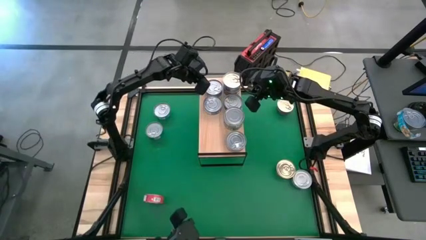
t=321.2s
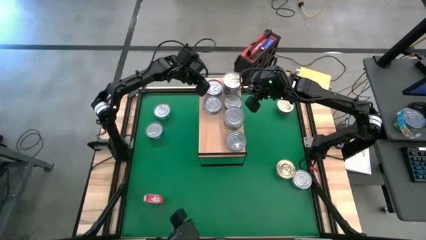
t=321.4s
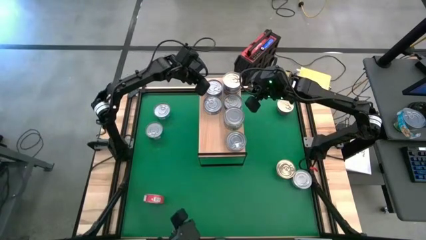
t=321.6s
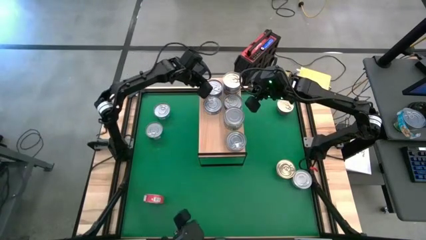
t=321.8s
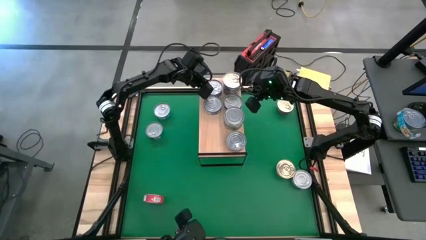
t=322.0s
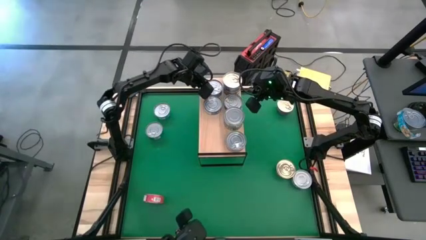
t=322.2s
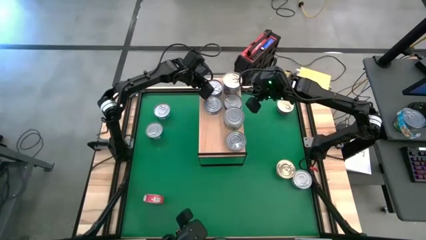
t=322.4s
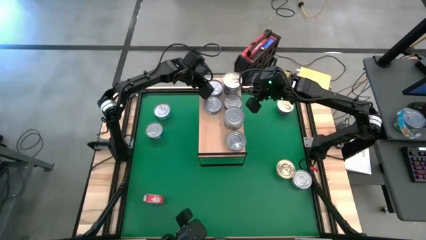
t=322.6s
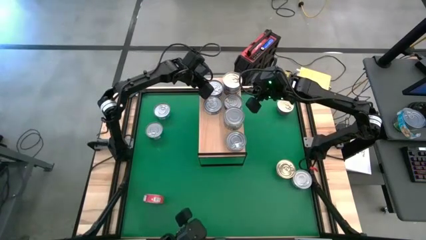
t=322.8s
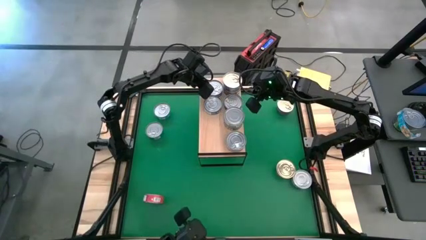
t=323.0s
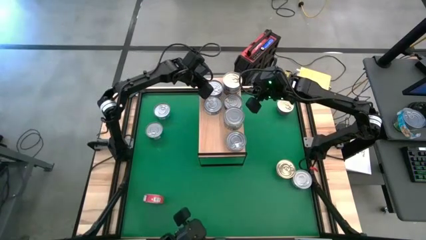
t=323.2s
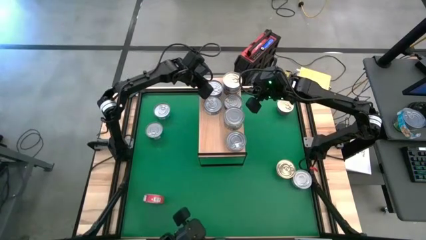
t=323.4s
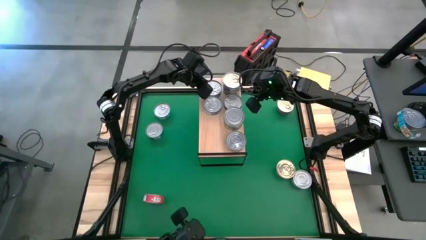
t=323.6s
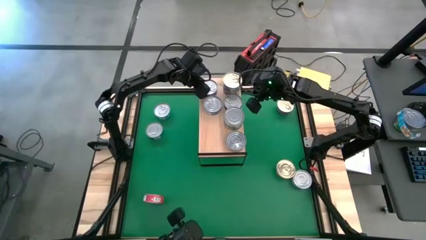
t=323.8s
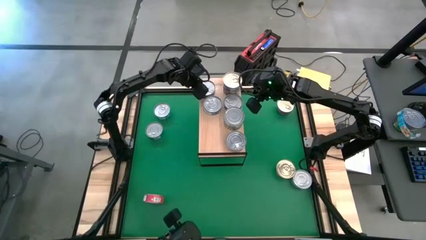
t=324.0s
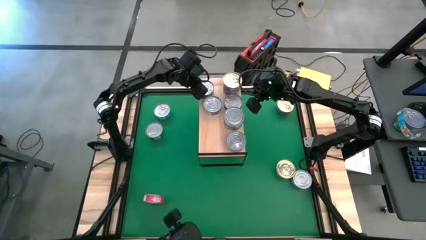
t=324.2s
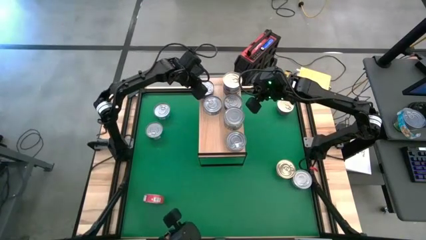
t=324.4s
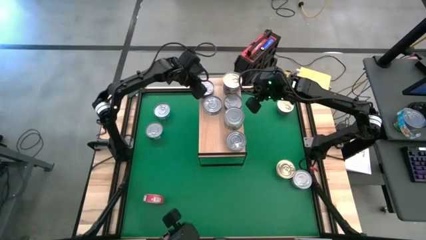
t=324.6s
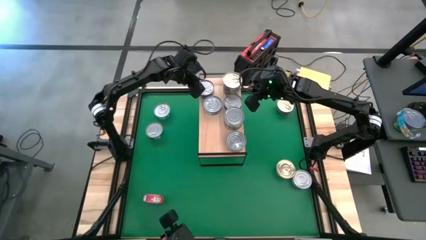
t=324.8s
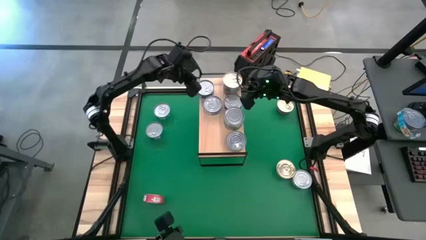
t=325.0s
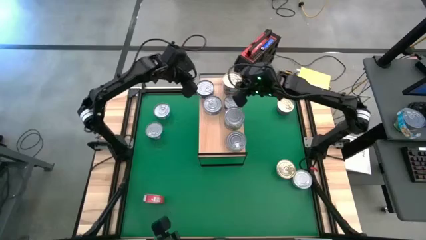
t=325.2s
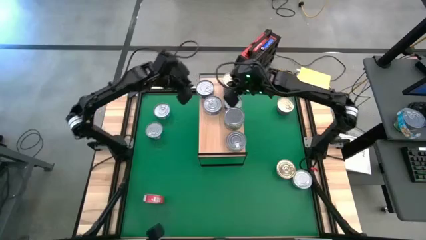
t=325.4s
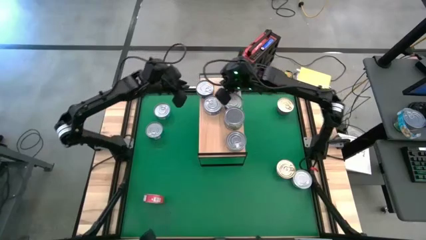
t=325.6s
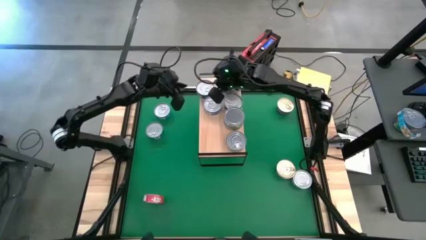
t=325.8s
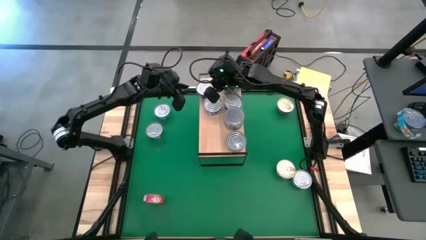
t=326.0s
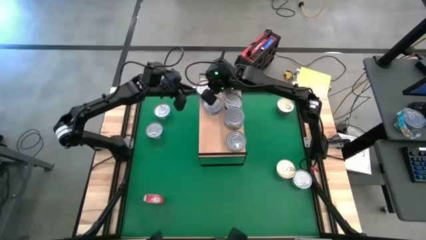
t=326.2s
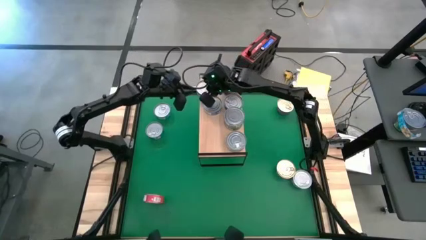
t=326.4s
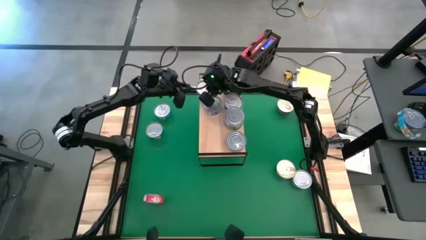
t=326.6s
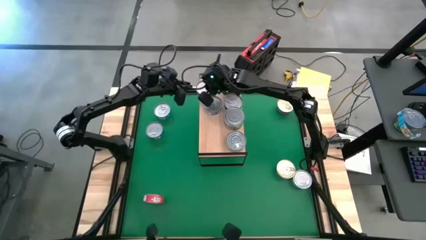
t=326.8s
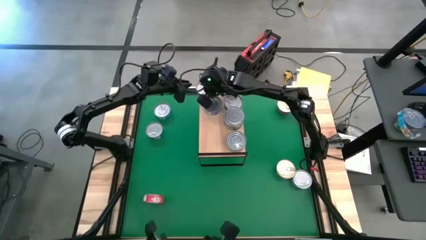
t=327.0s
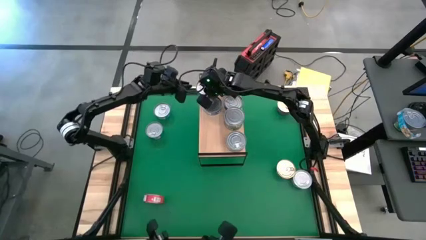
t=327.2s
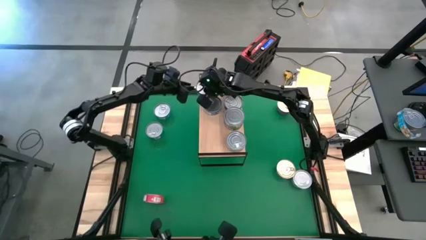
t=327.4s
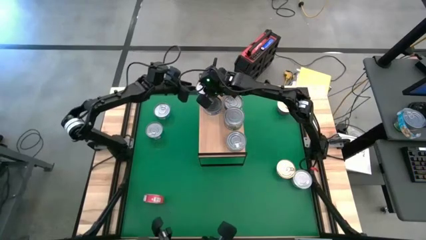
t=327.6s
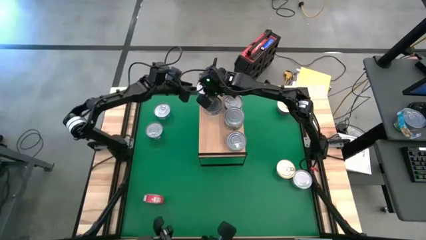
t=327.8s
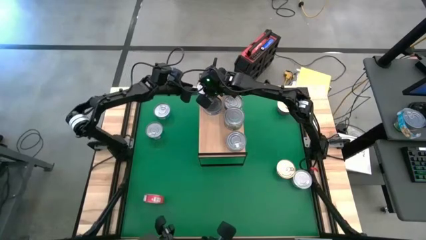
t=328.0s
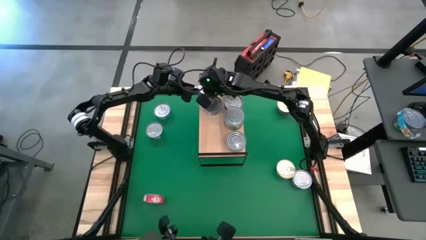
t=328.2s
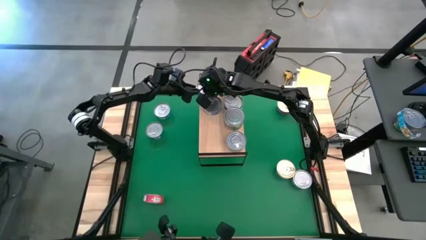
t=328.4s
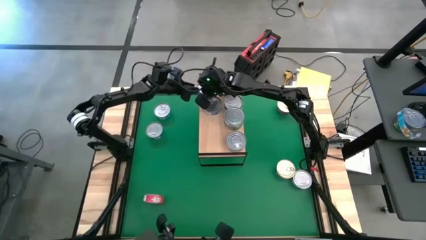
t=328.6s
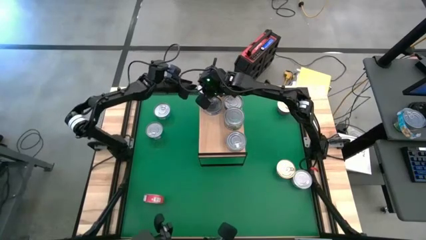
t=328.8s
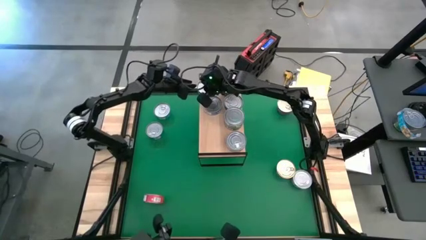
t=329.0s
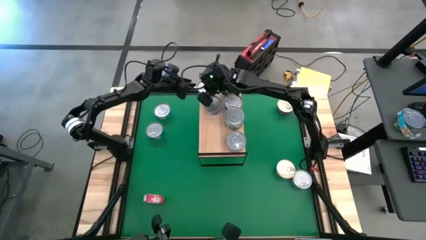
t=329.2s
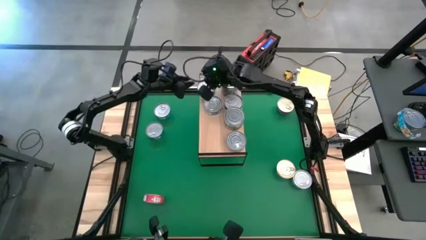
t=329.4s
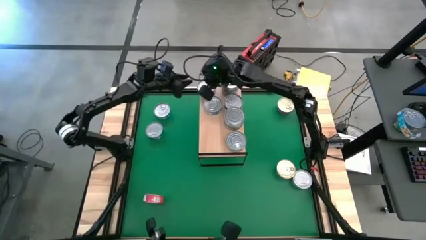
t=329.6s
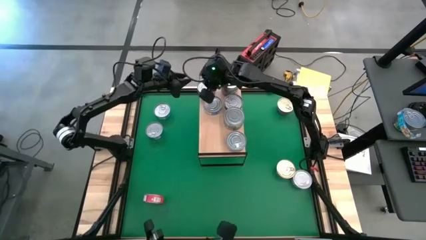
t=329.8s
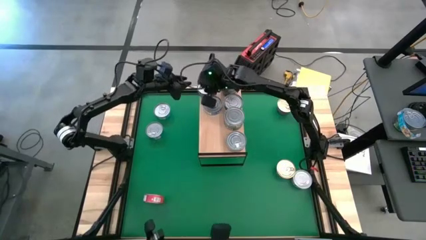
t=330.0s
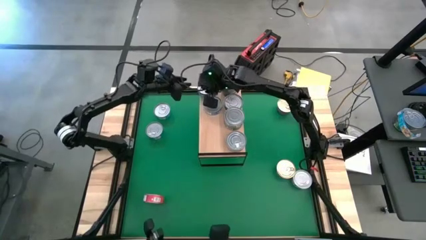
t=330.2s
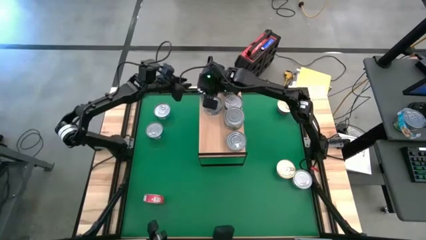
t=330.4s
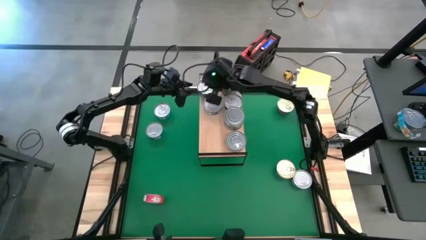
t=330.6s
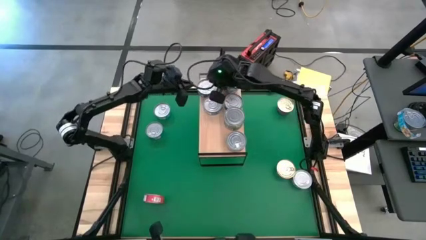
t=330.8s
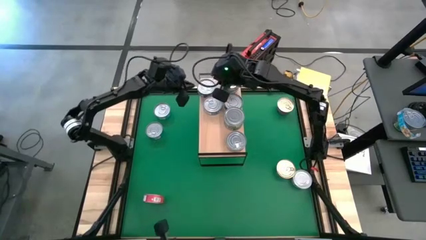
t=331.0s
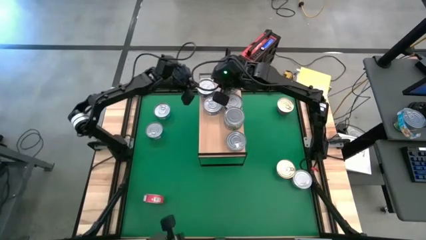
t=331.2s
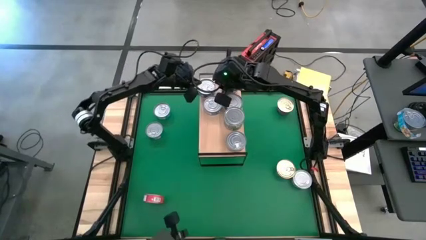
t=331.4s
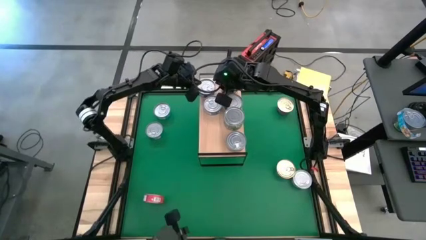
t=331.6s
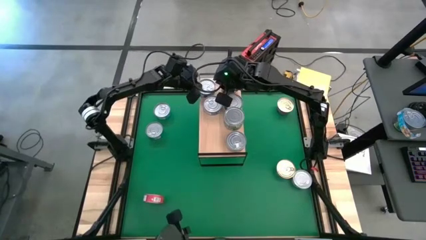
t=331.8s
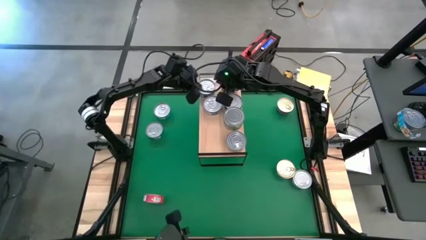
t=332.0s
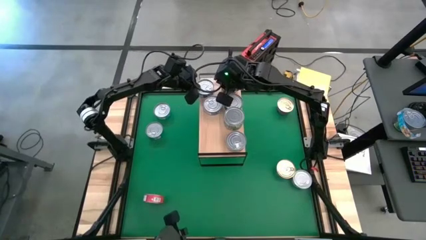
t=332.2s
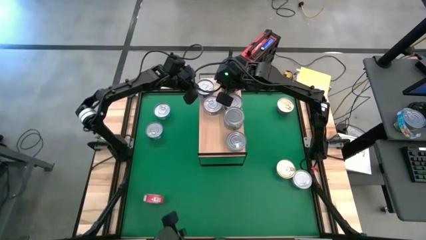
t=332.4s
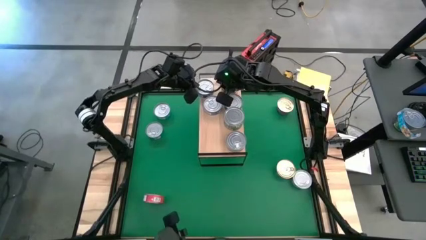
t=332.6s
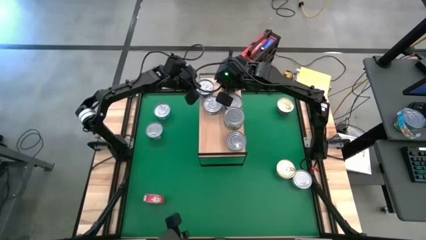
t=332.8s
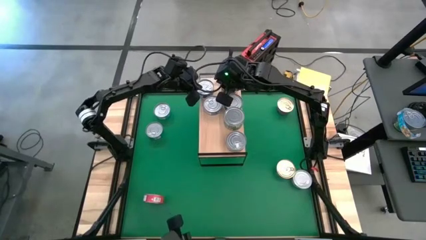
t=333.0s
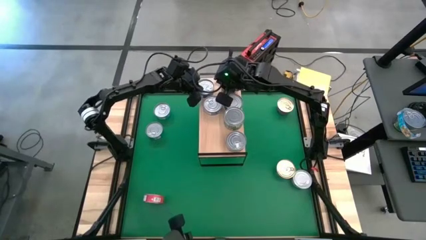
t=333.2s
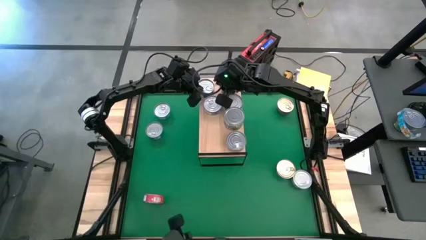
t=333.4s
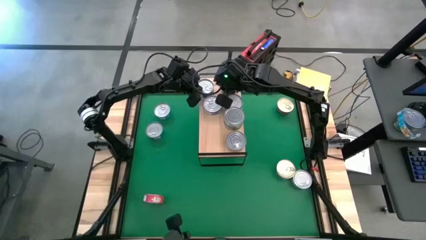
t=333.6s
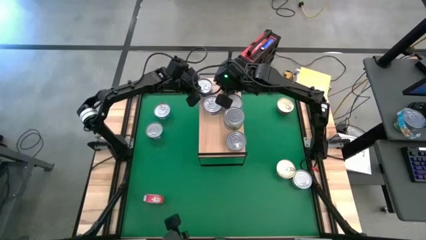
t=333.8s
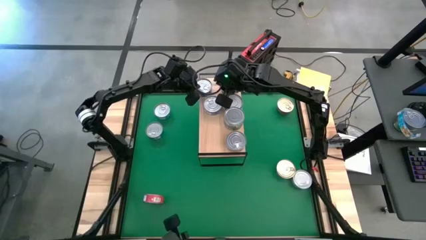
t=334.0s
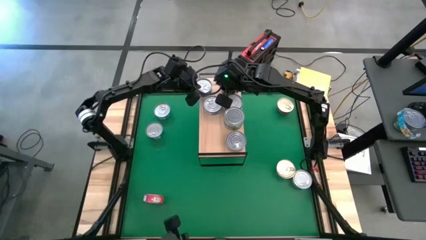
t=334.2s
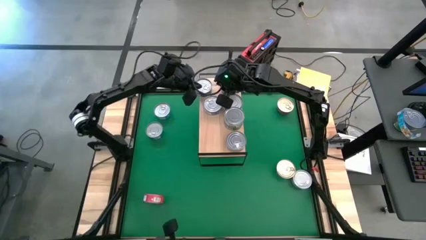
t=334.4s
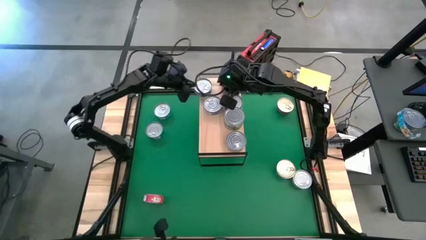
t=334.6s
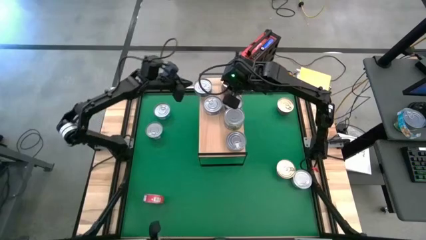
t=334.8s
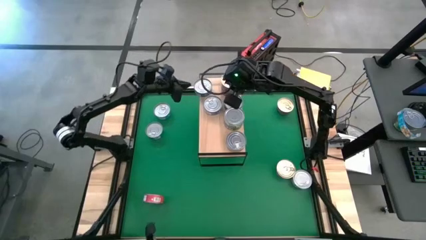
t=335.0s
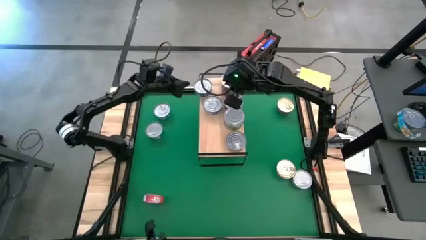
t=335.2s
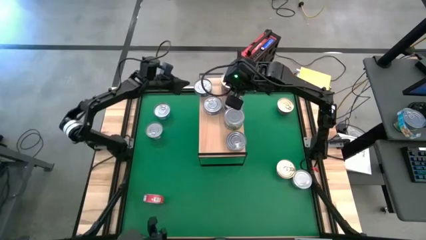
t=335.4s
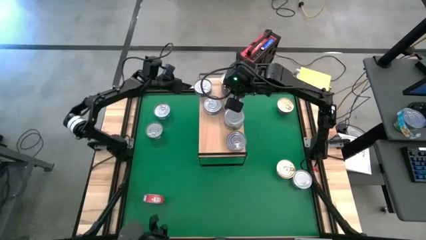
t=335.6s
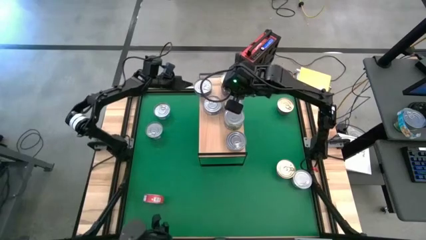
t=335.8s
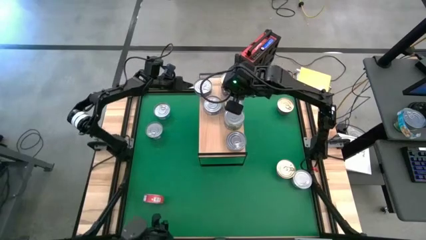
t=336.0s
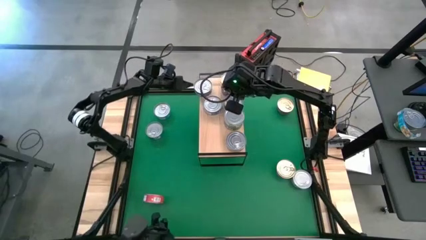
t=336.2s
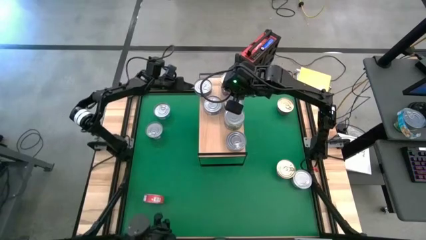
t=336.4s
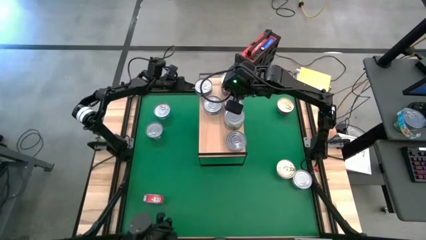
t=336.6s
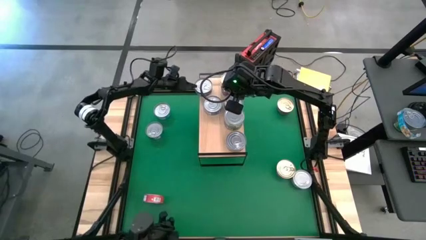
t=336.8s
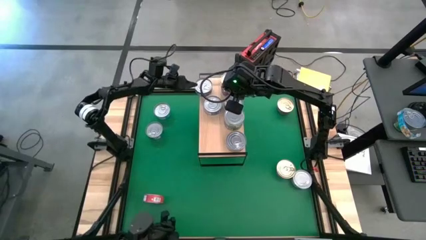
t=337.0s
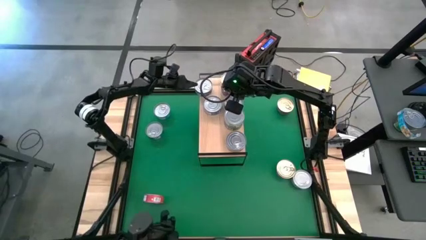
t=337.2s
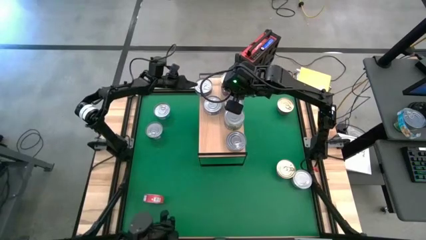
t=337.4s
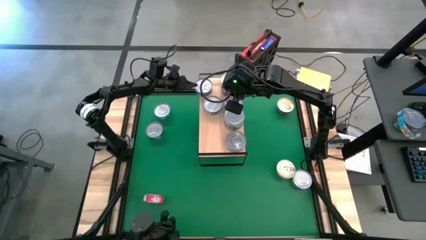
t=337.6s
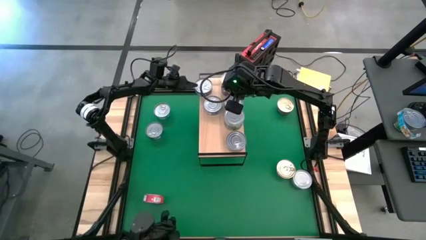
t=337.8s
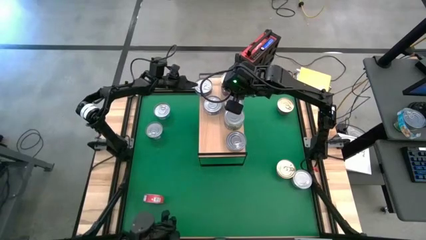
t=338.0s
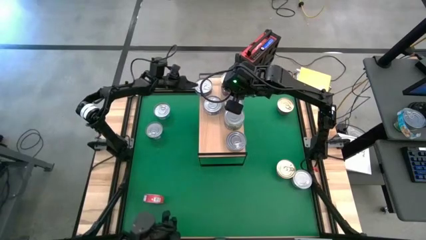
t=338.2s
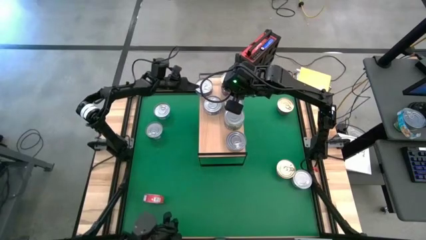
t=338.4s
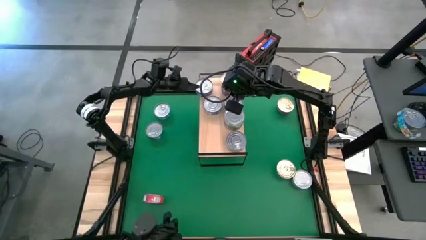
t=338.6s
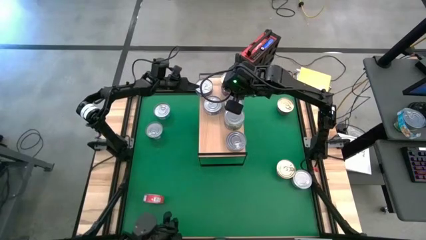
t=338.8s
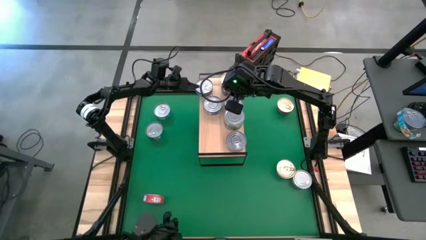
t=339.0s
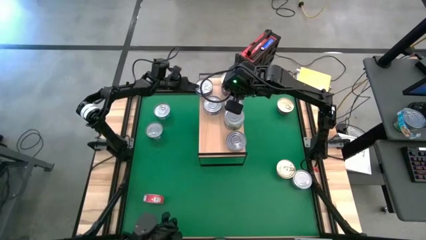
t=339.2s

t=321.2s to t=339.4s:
Task: Stack canned seafood by type on shelf
Stack the blue tuna can on top of the blue tuna can on the shelf
